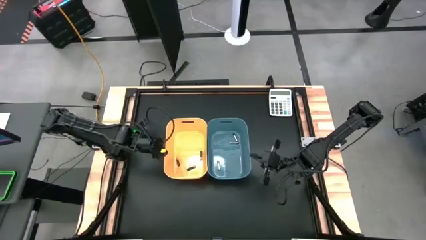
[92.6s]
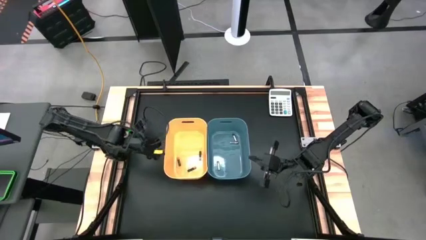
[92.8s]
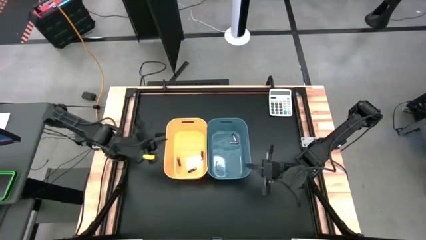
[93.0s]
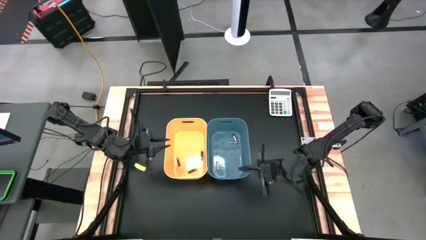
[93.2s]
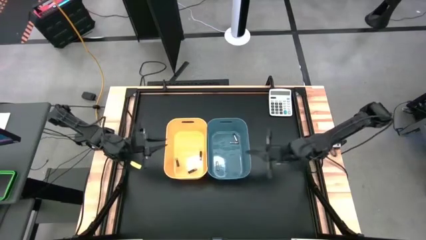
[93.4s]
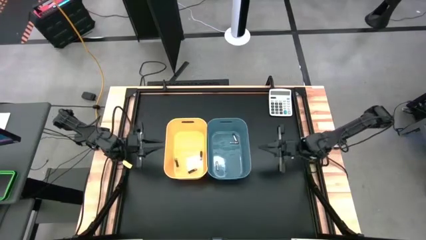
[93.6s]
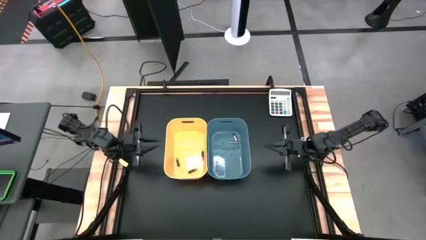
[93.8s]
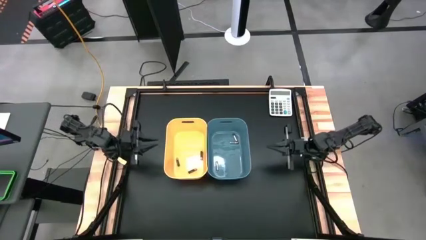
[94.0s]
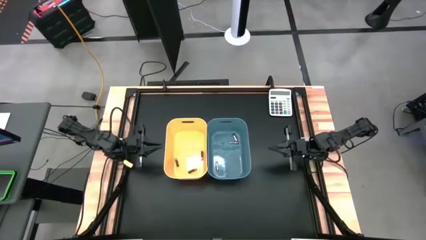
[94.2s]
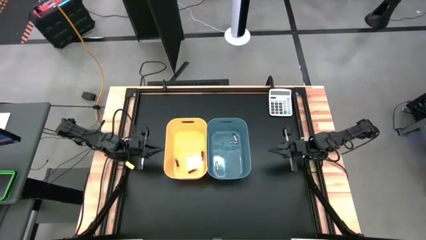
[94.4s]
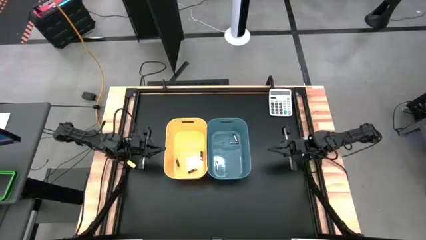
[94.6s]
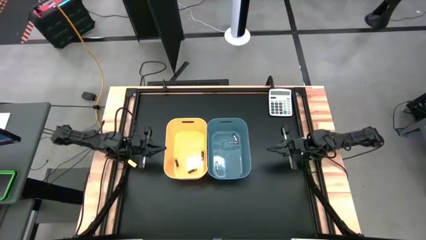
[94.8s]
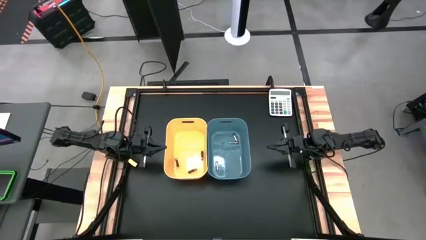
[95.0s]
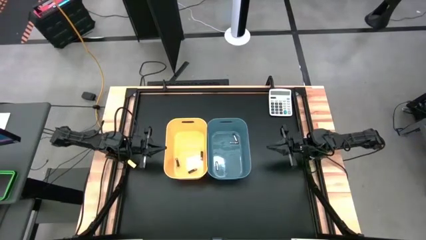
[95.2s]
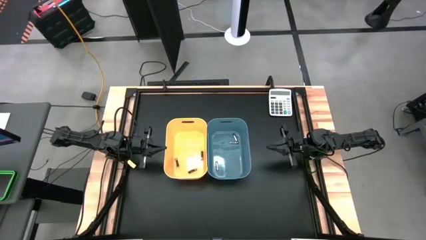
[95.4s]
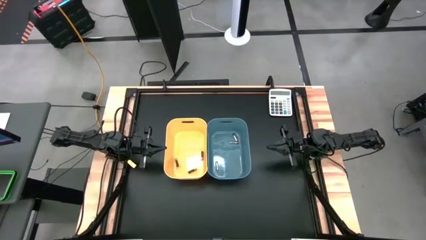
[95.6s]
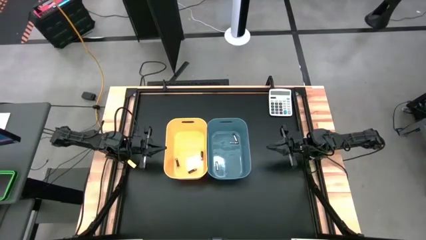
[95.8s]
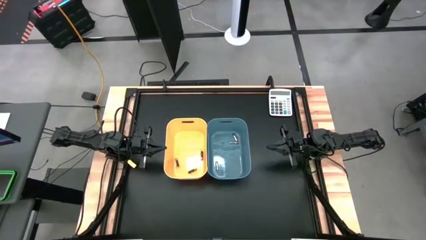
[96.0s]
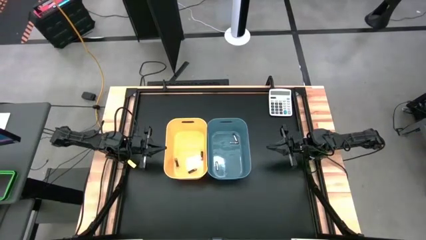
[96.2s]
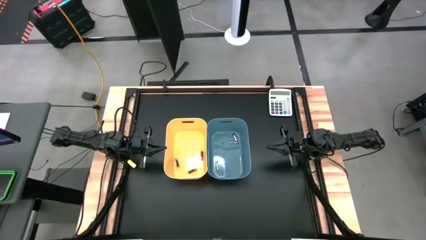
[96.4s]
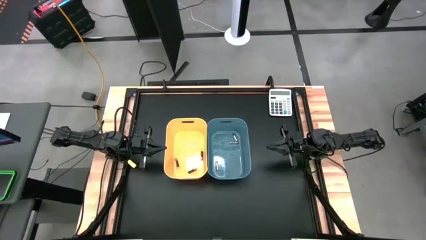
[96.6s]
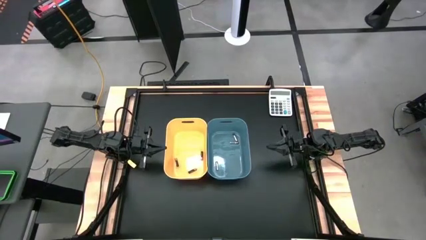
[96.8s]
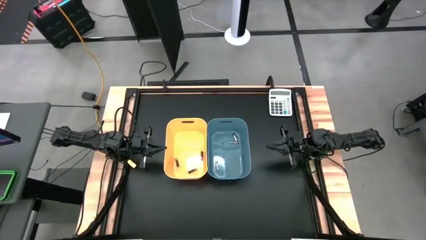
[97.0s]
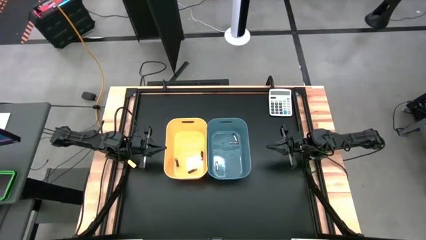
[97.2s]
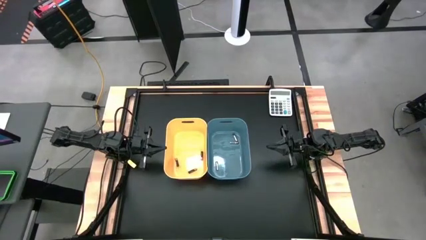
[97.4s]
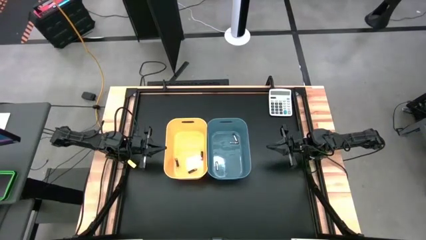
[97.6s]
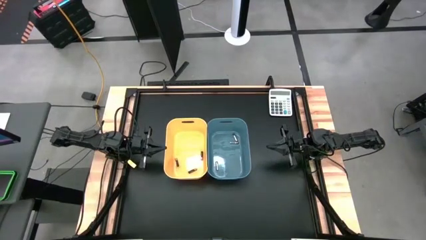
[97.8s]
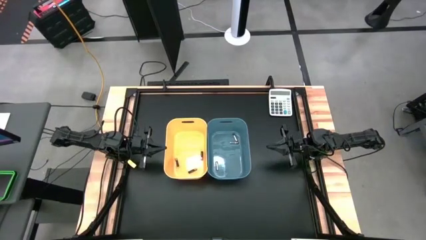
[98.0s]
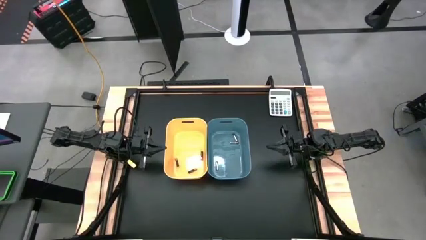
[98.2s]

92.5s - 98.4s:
Task: Sort batteries
Return to home position

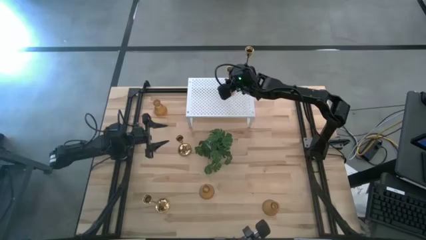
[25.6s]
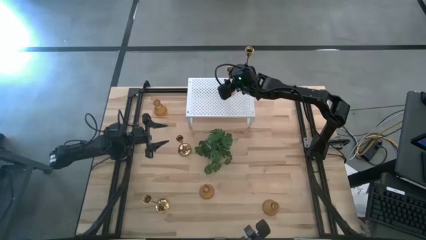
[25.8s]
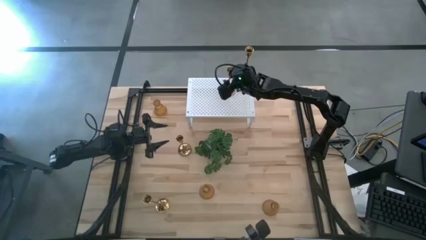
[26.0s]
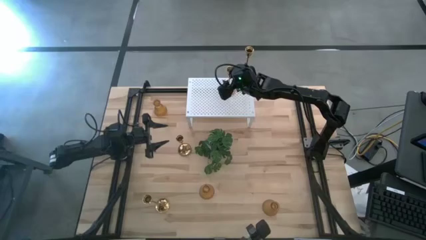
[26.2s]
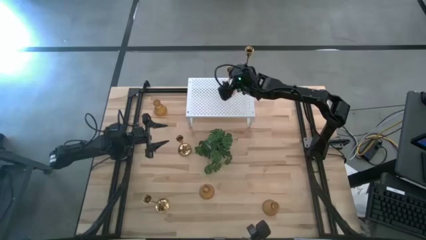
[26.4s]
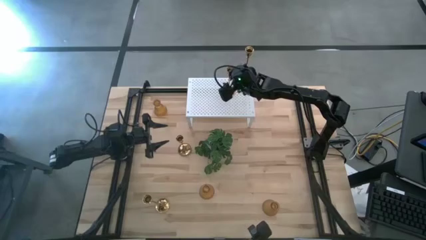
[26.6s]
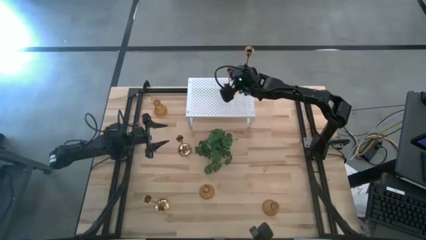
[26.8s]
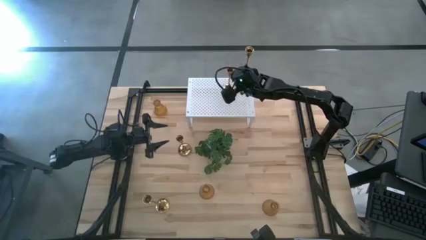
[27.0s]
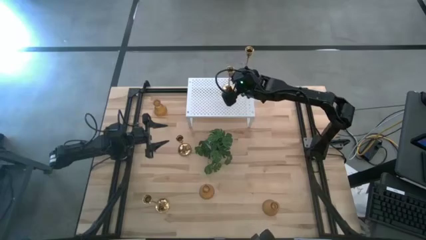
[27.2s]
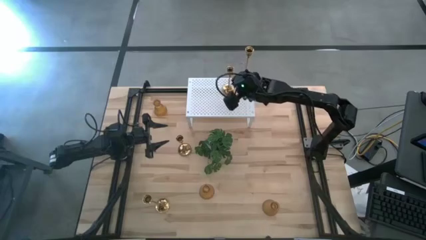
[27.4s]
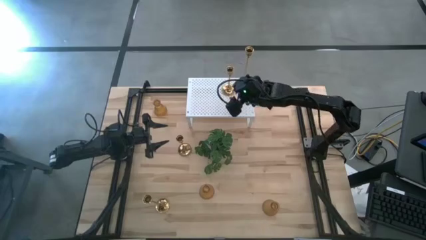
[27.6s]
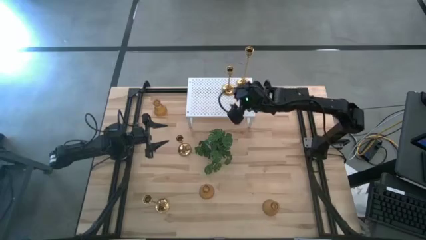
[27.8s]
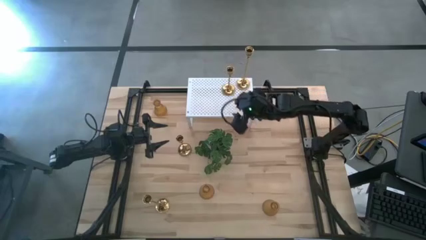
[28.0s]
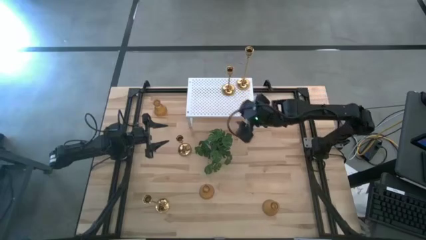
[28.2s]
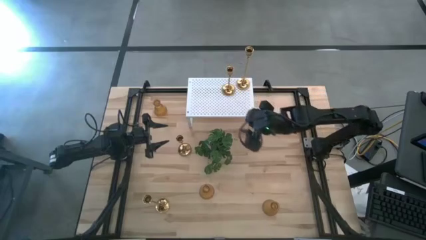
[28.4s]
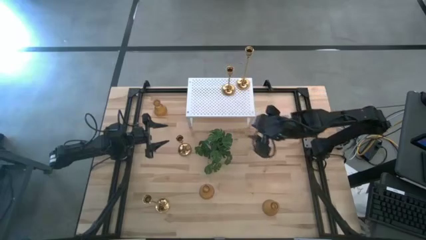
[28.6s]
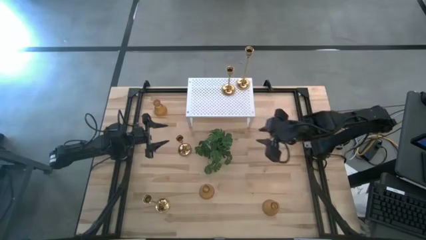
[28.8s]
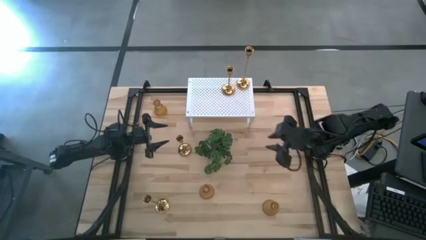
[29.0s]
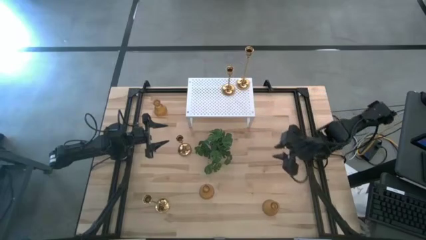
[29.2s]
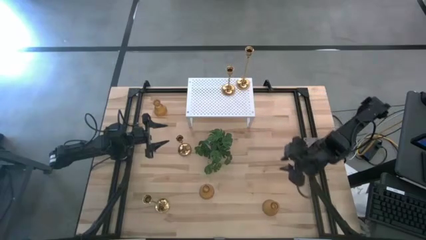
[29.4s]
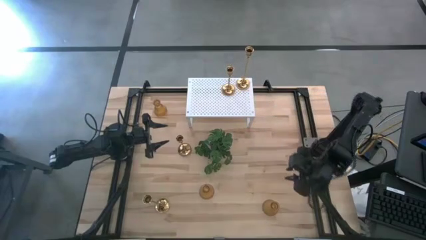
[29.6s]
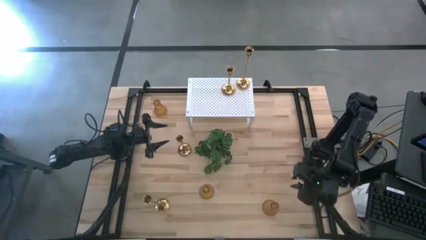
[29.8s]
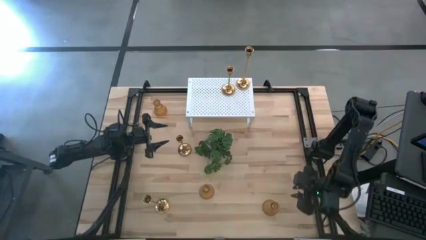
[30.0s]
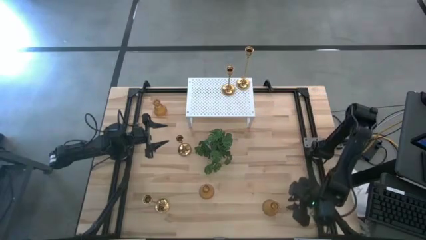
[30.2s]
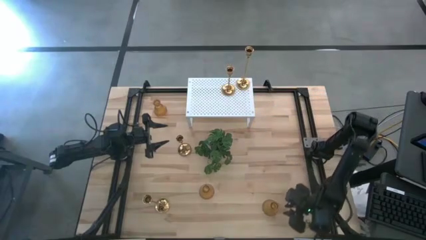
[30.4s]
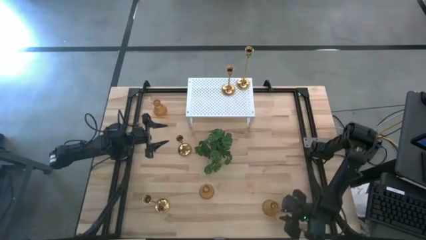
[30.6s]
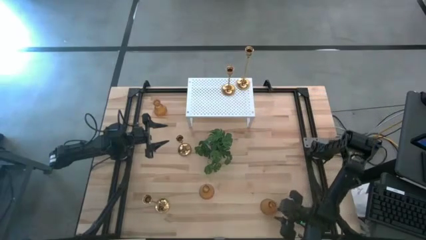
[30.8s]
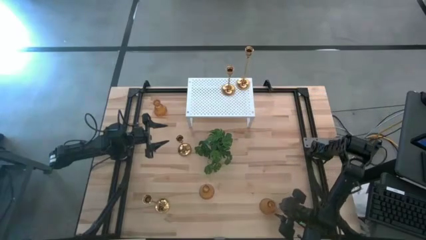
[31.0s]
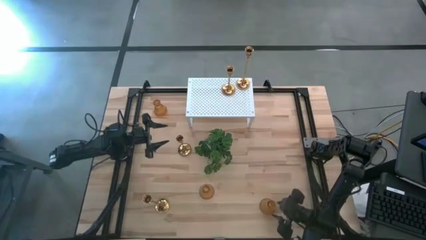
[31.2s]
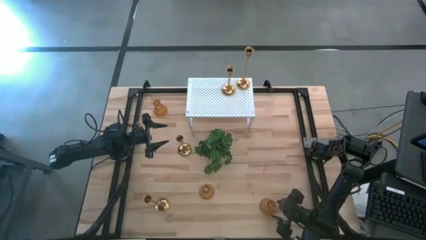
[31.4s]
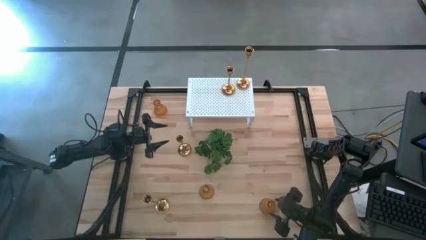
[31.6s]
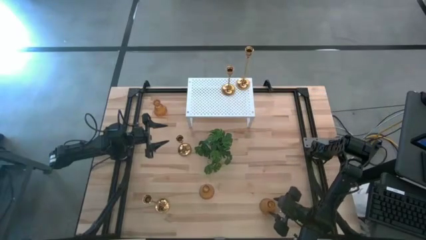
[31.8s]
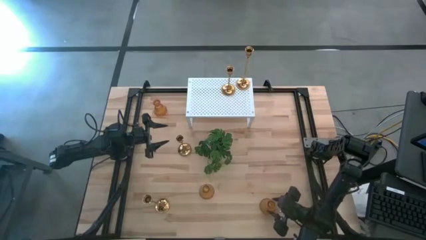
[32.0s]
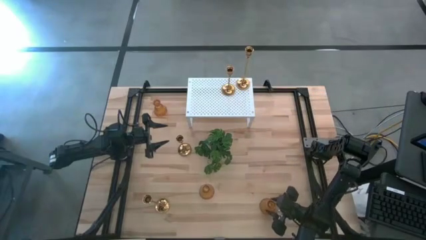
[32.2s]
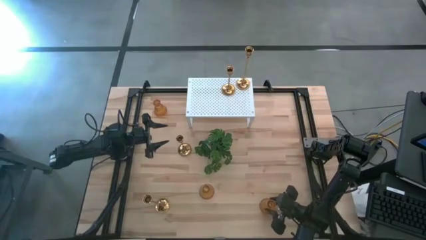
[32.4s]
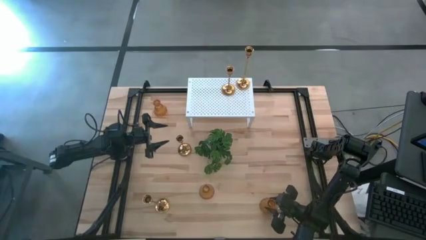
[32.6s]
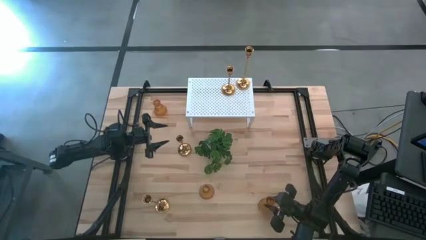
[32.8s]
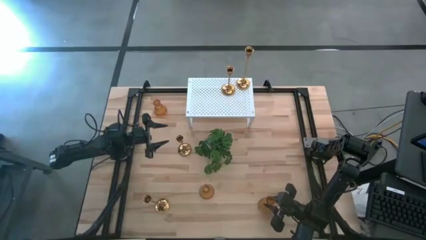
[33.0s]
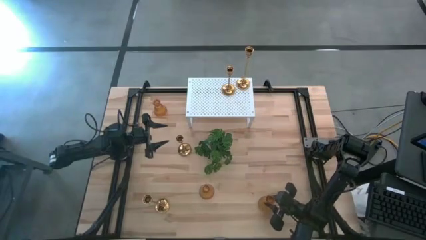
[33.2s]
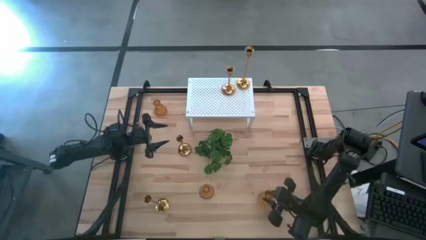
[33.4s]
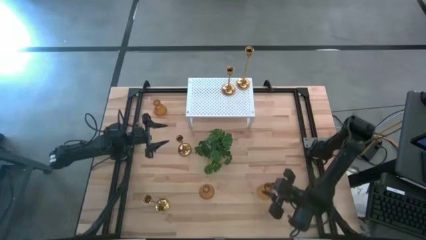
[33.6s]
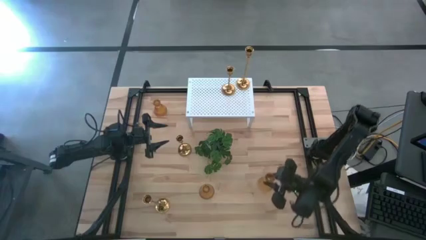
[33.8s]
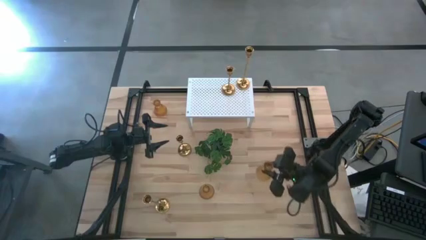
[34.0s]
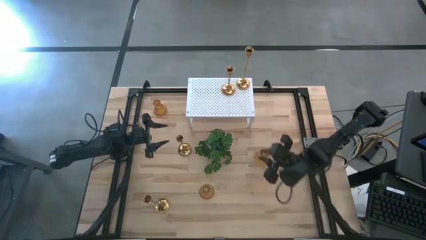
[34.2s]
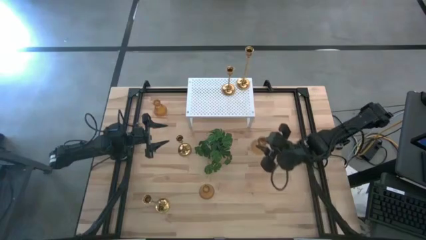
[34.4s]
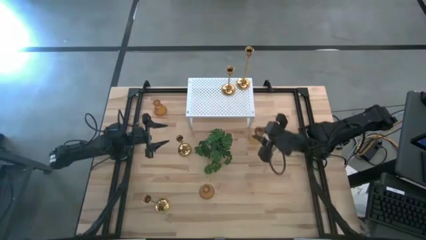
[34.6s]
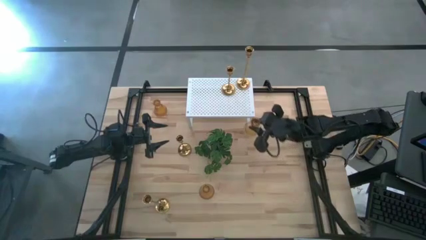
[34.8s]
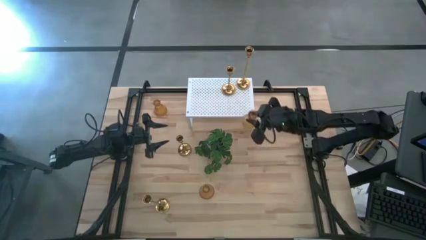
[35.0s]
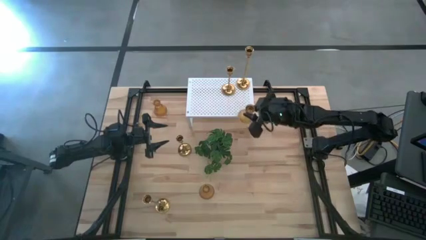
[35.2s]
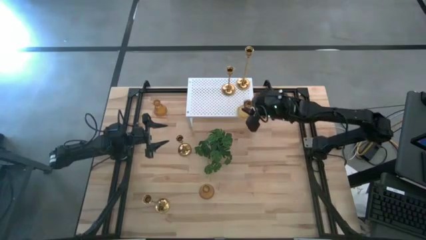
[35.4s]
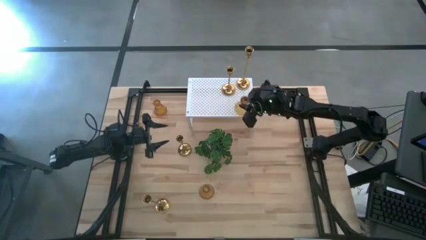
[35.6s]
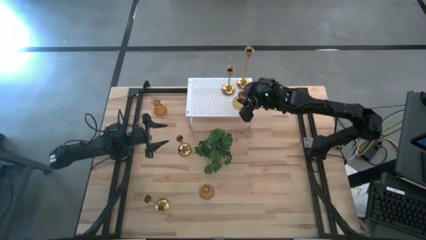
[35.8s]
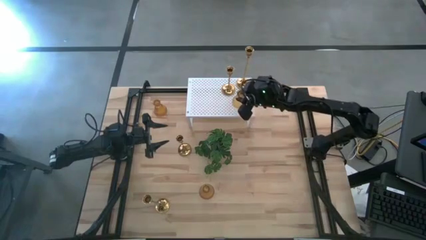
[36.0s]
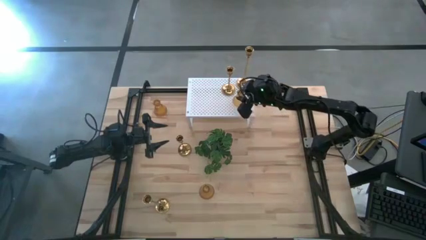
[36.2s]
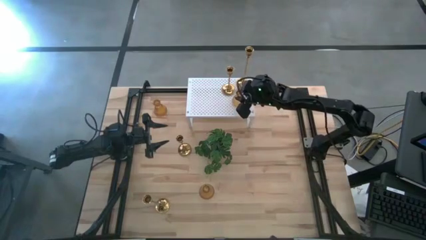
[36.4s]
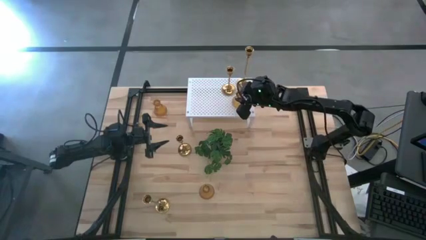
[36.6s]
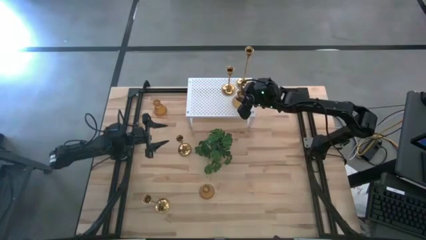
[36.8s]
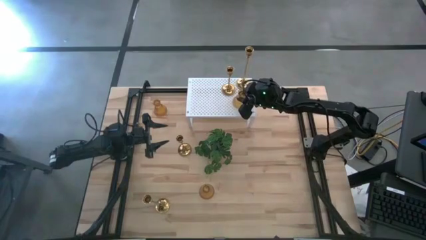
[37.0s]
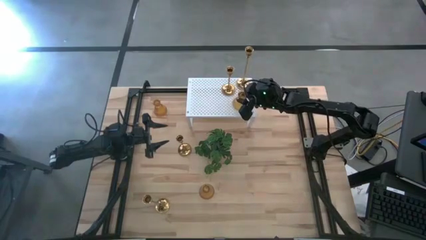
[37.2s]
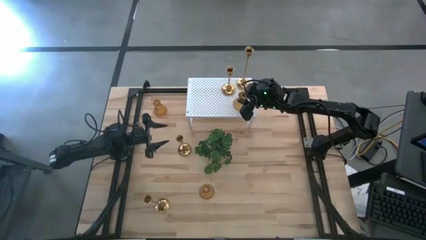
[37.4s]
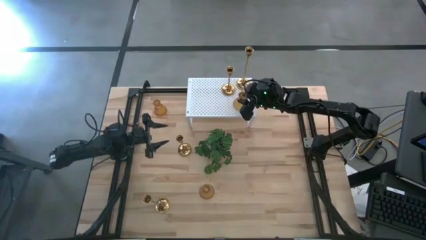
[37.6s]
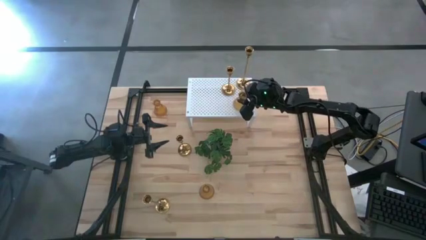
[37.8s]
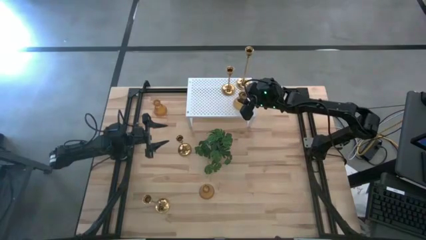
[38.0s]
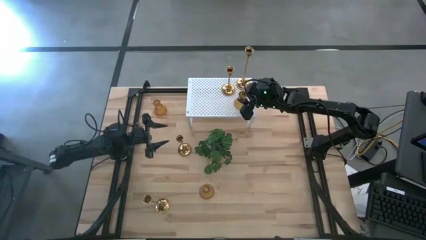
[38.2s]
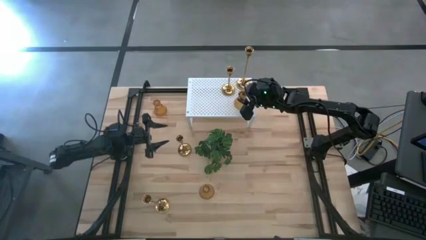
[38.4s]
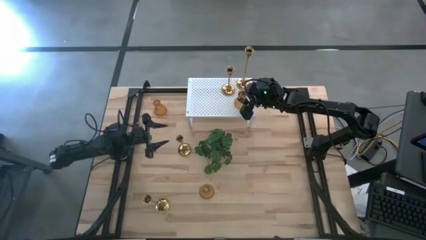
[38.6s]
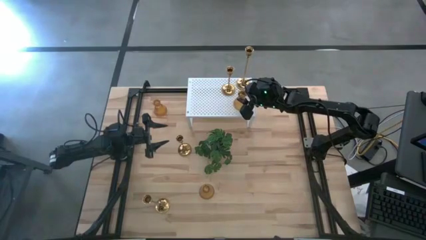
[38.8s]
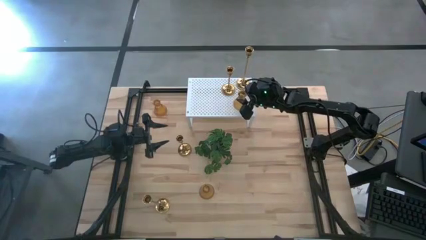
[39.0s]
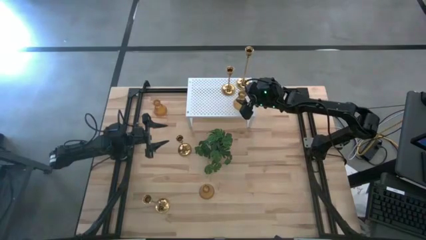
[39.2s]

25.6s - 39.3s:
Task: Pick & Place candle stick holders
Put the yellow glass candle holder on the shelf
